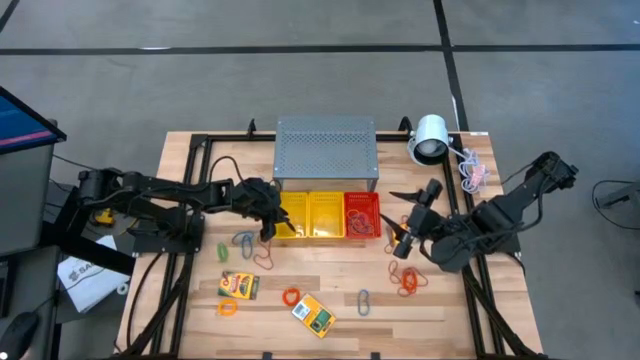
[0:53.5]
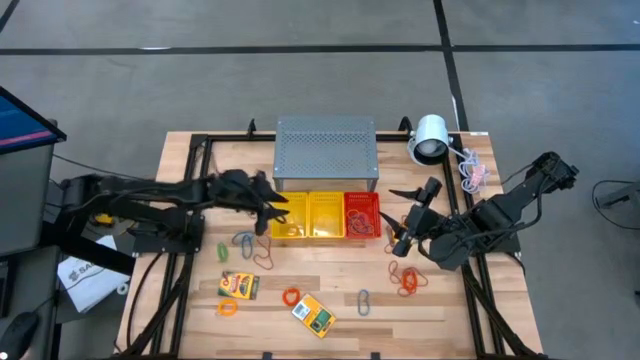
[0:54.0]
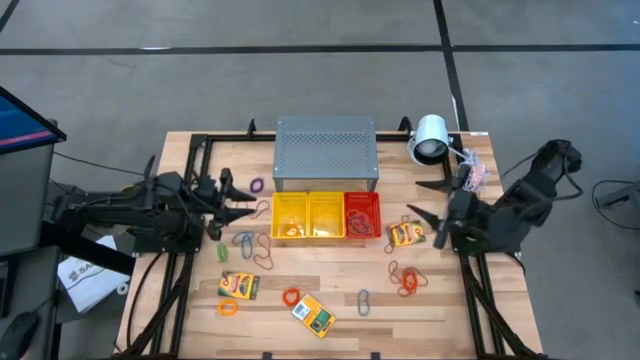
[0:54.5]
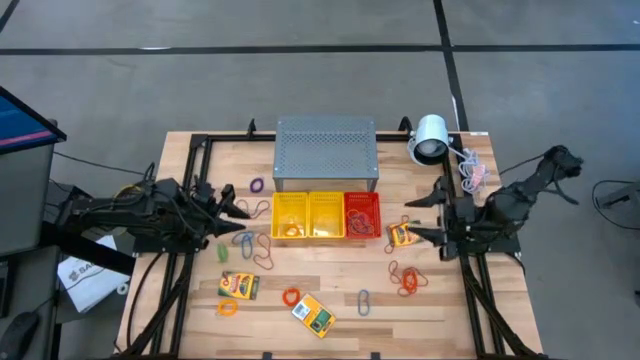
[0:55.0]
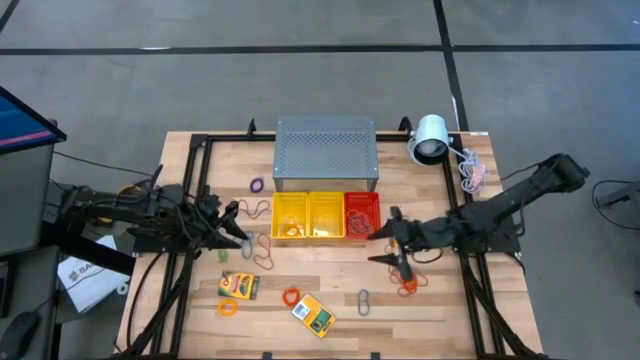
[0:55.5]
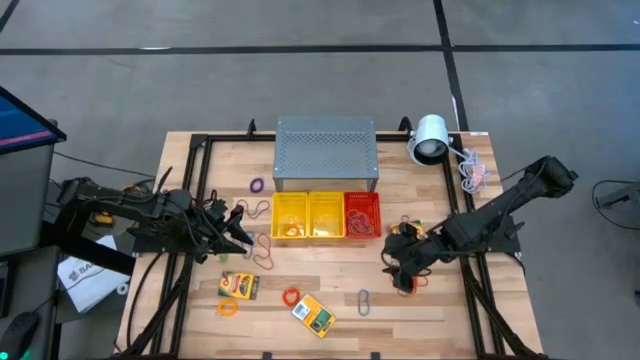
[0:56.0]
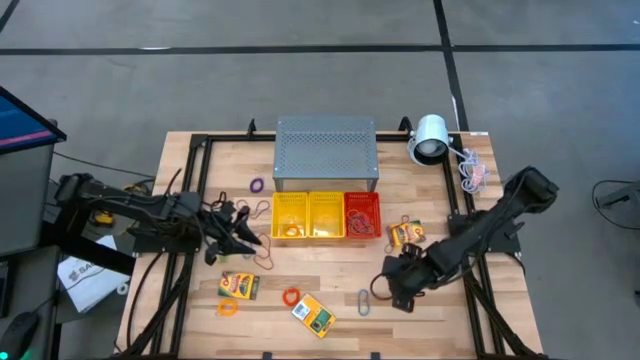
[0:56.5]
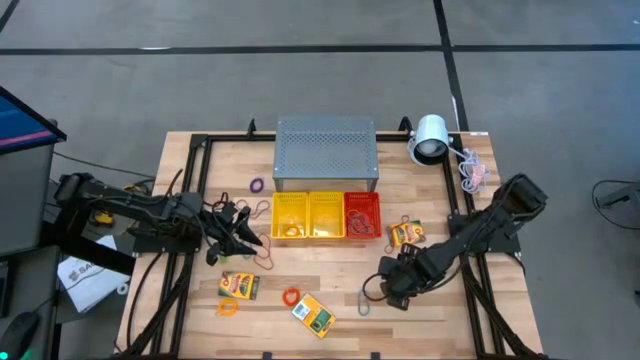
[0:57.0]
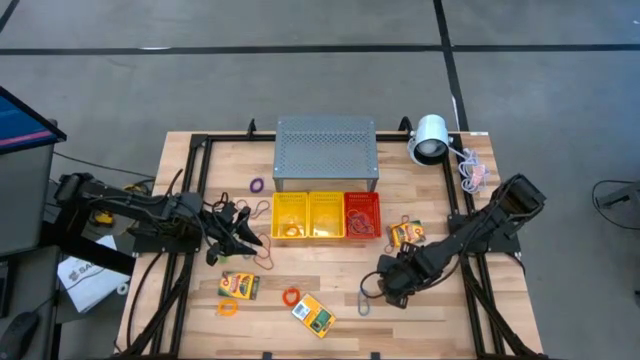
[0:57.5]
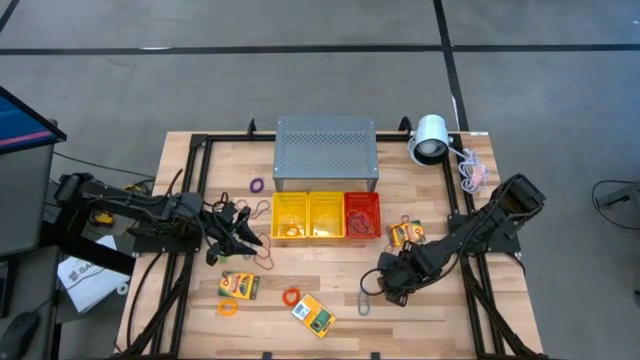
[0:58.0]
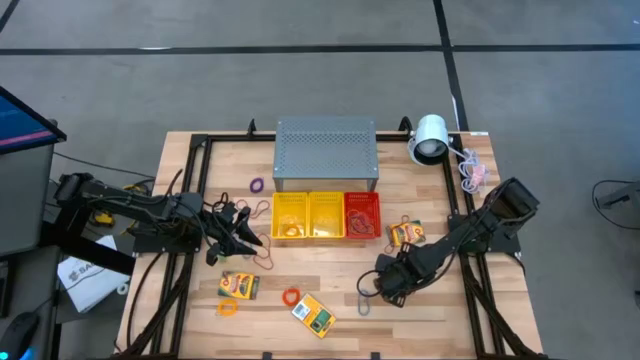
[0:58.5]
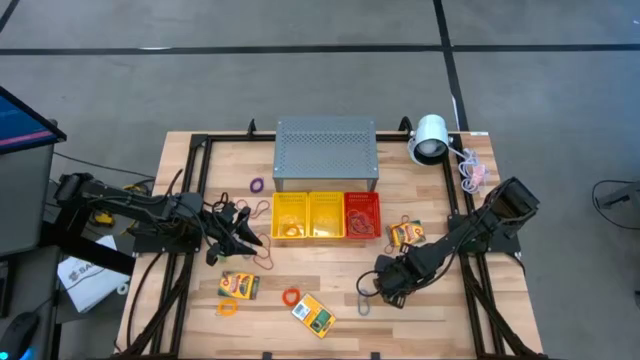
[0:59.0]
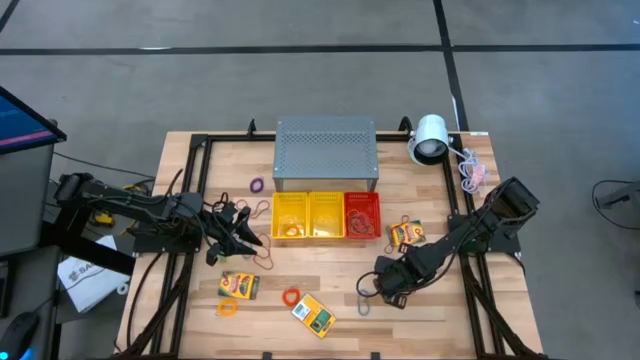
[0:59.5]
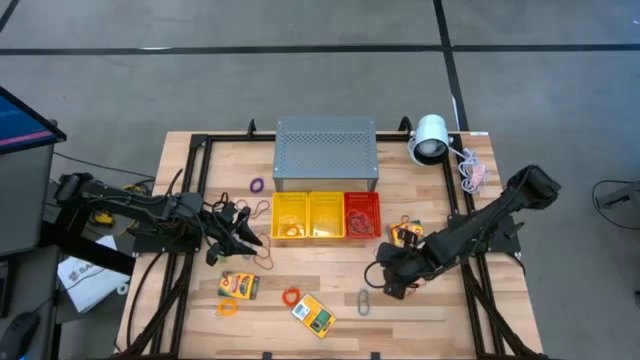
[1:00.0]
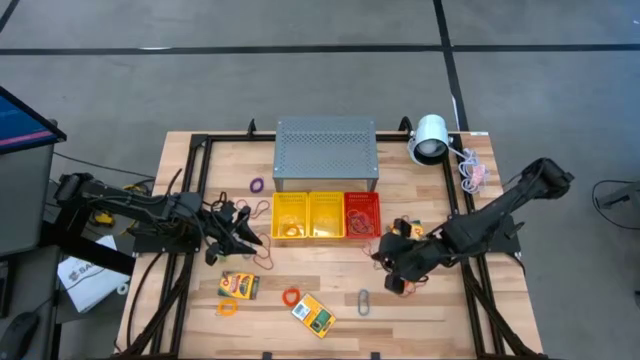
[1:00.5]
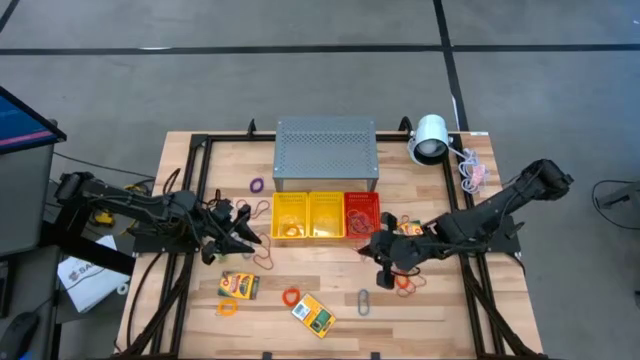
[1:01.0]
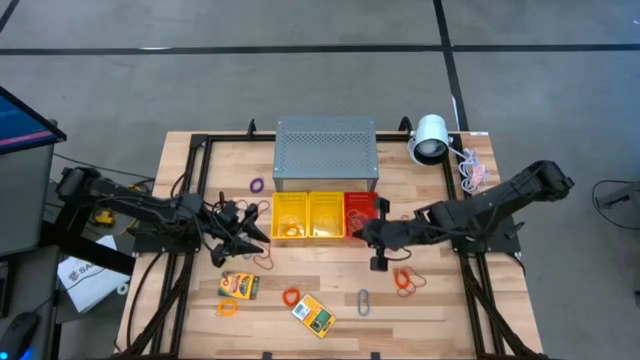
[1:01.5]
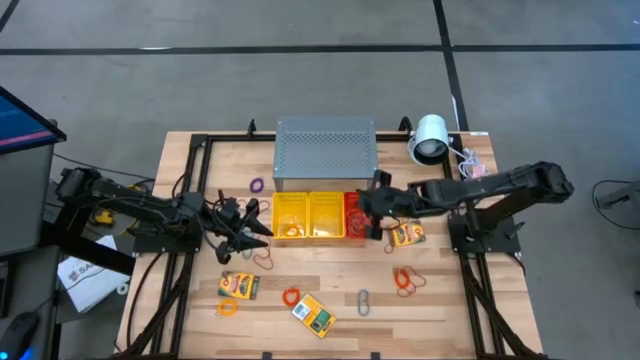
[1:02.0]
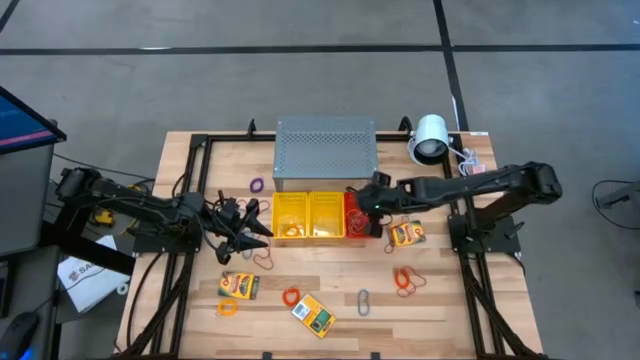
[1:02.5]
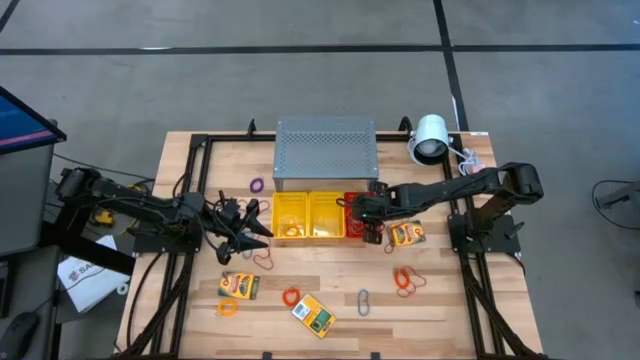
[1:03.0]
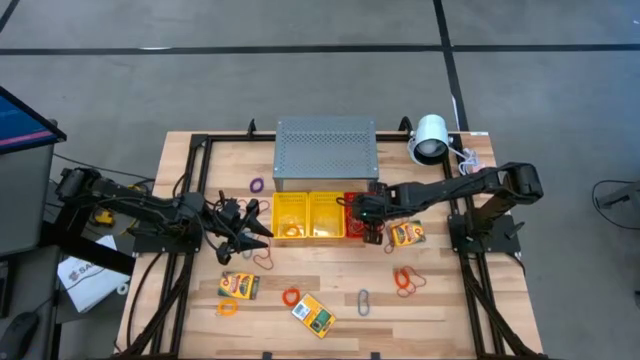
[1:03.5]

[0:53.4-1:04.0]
Task: Pick & Place Office Desk Supplies
Put the red rubber band into the red bin

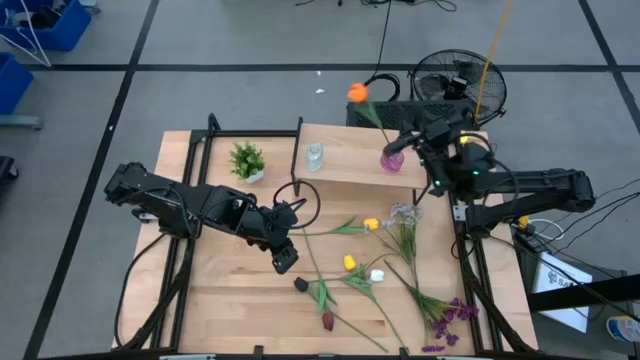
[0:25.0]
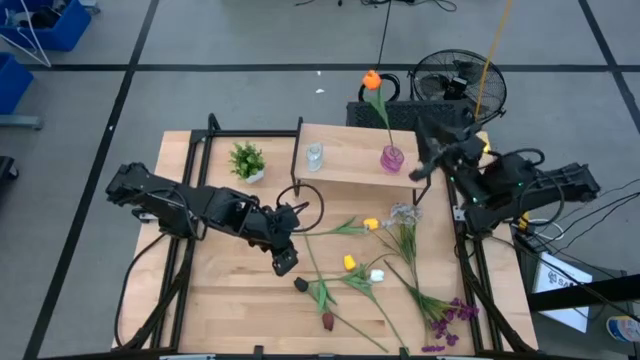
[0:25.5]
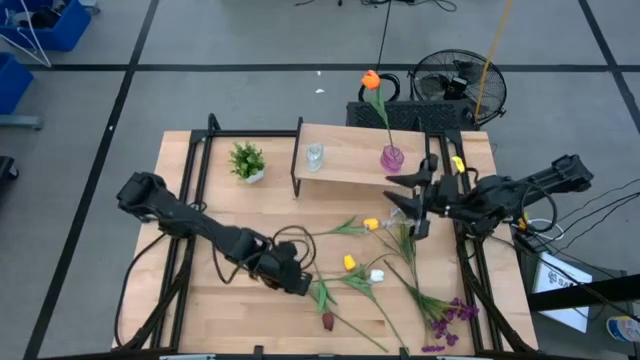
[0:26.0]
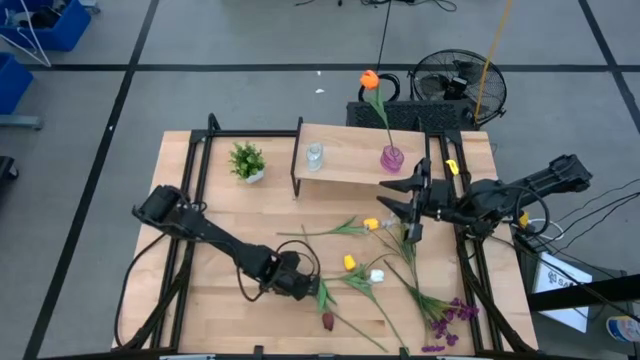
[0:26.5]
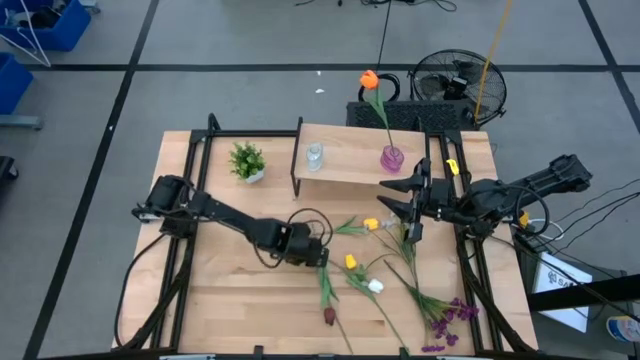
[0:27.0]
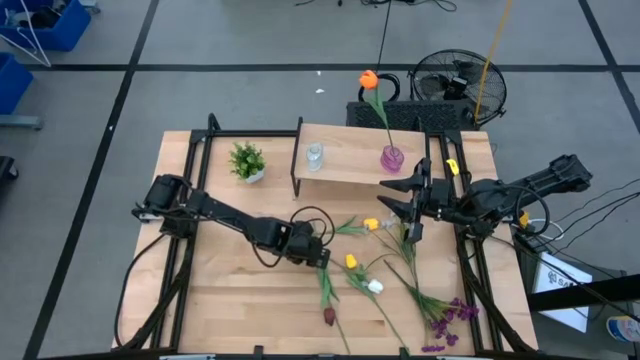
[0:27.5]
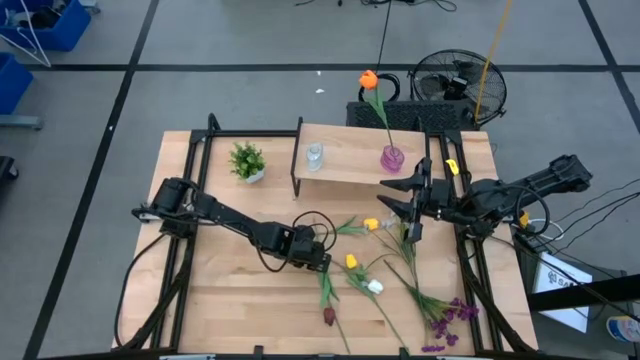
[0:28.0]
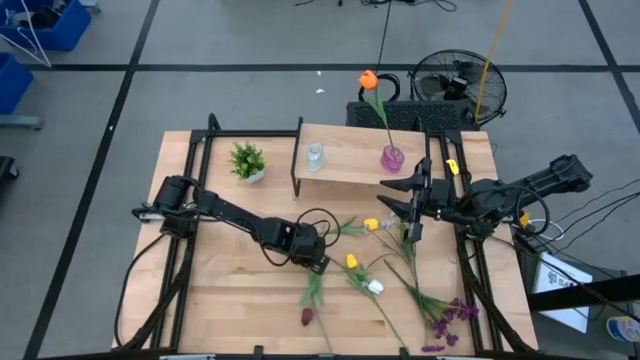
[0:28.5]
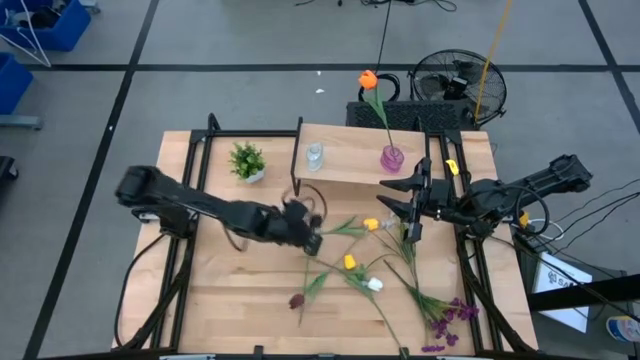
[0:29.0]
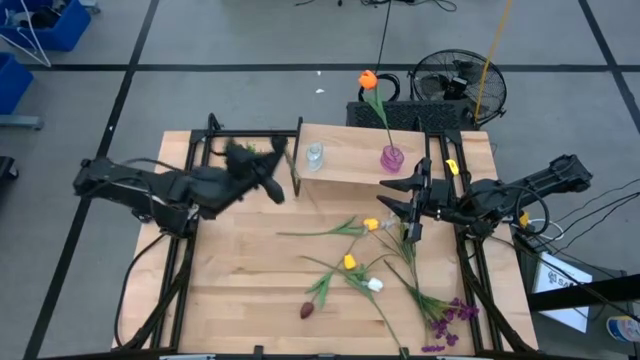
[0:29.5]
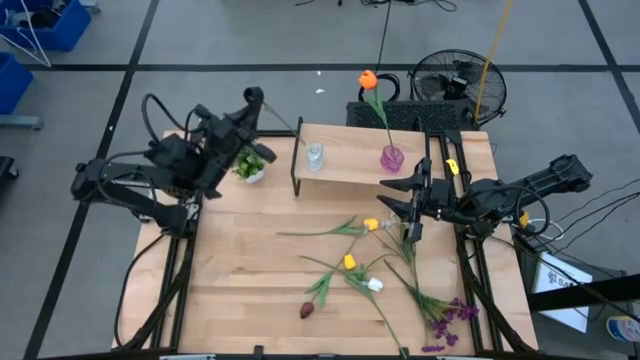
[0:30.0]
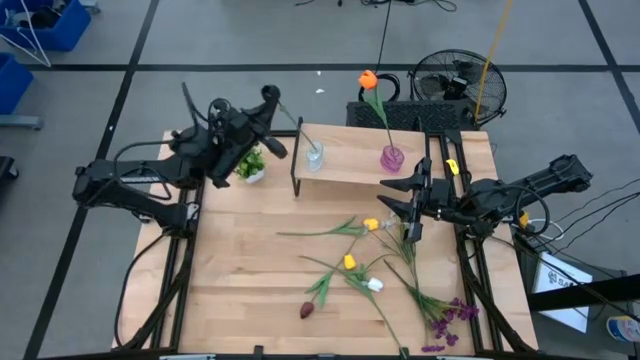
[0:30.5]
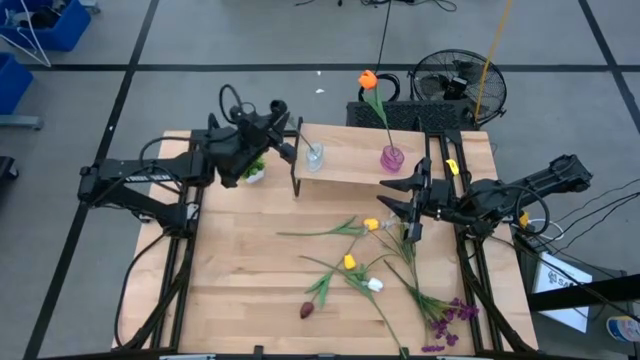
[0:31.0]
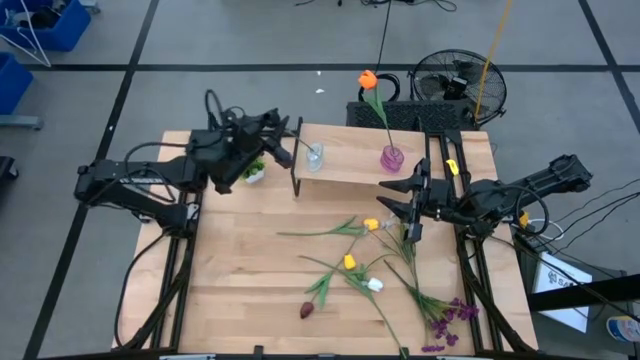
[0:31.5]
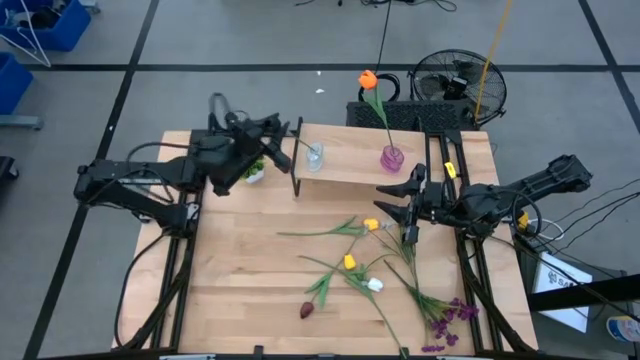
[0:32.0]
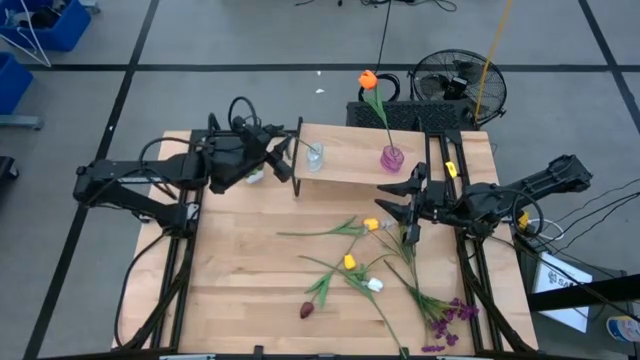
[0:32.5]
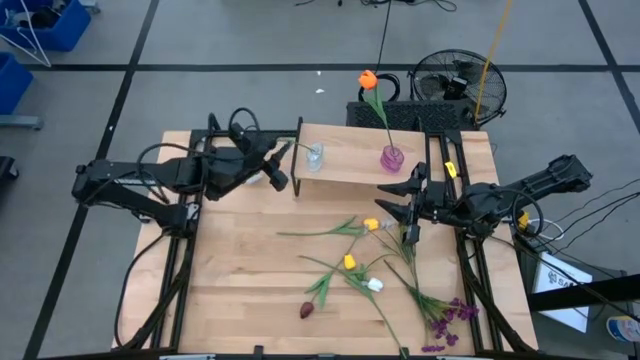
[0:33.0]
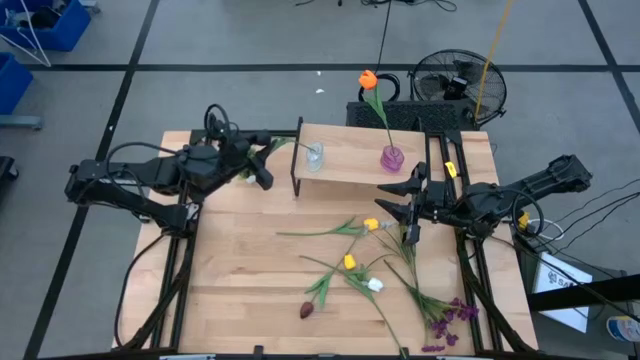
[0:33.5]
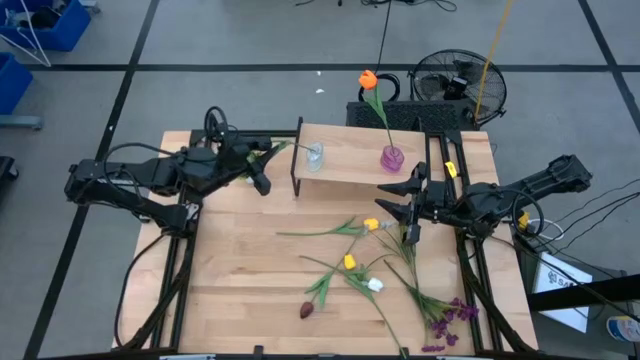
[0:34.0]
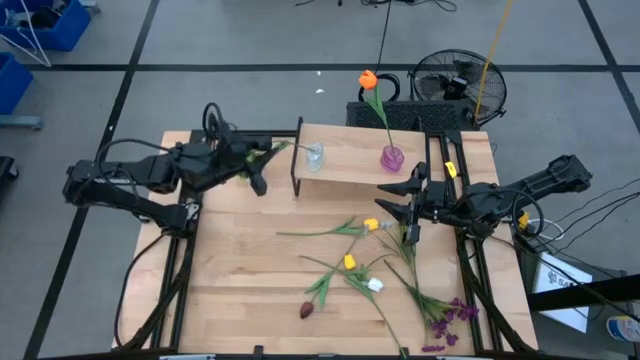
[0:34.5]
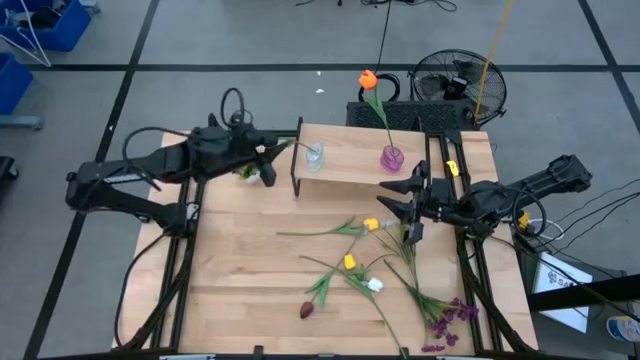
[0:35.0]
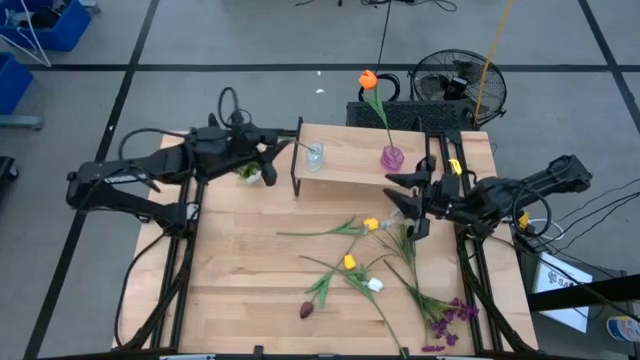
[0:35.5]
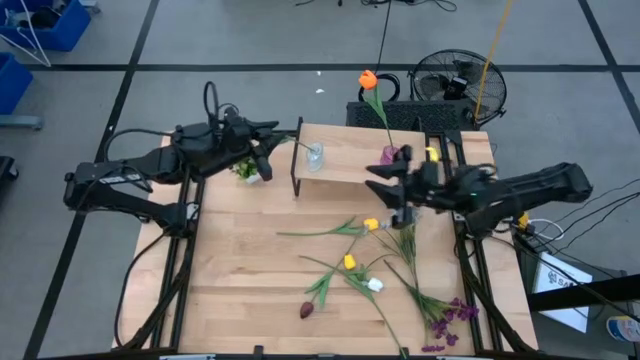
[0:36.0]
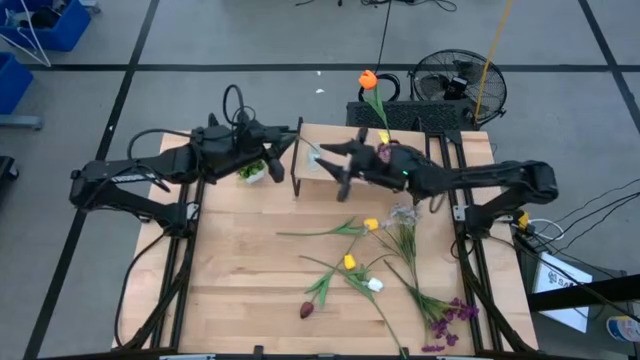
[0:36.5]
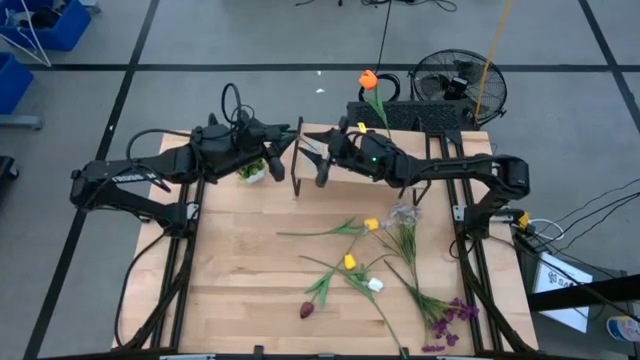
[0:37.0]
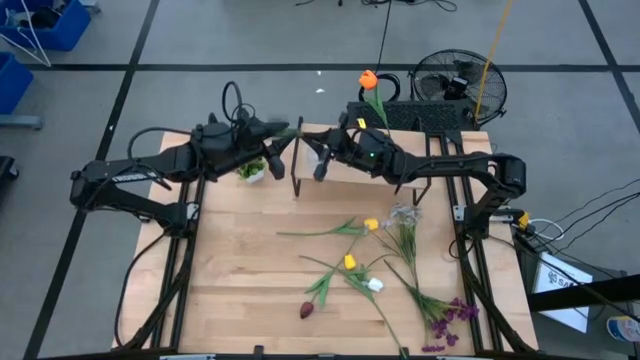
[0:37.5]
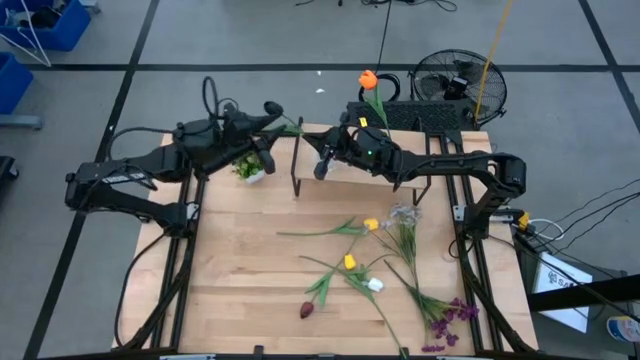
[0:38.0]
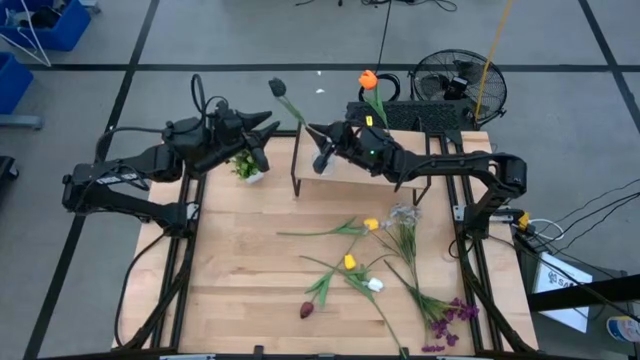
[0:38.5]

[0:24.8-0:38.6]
Task: Pick and place flowers into a vace then onto a shelf
Put the black tulip into the transparent vase
